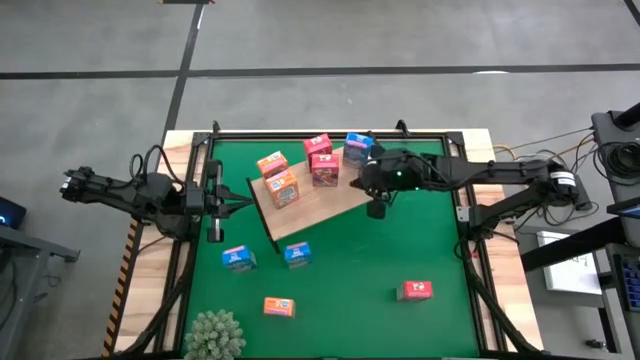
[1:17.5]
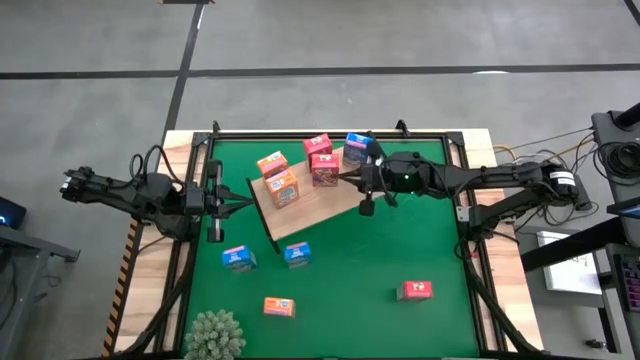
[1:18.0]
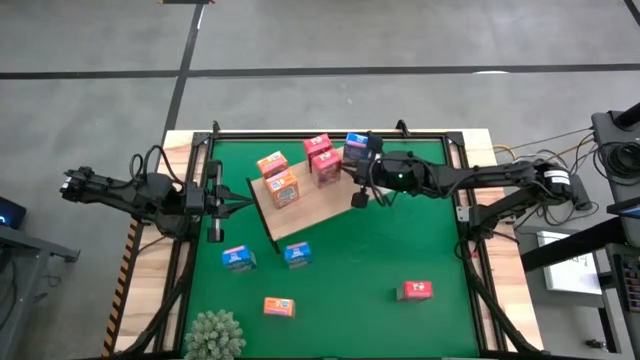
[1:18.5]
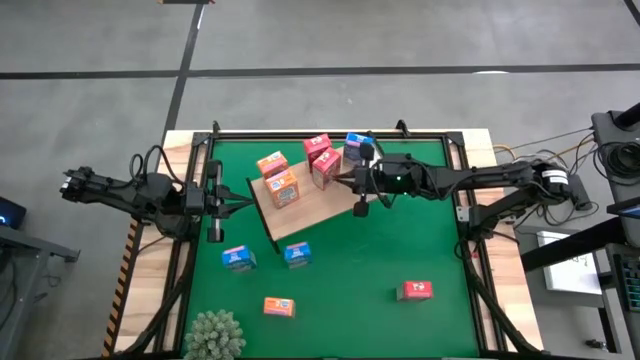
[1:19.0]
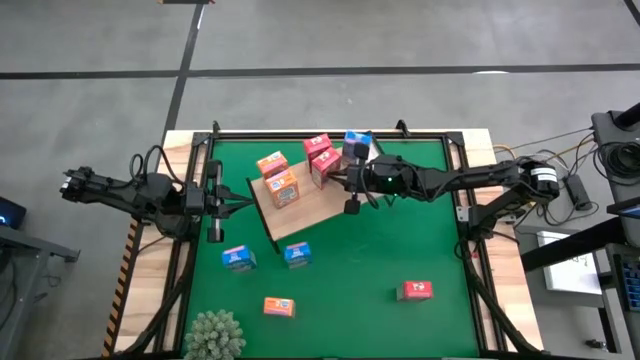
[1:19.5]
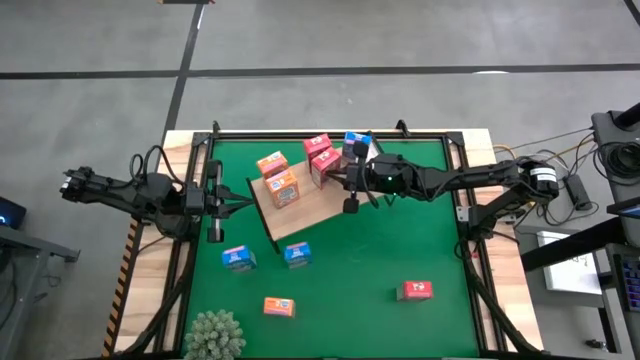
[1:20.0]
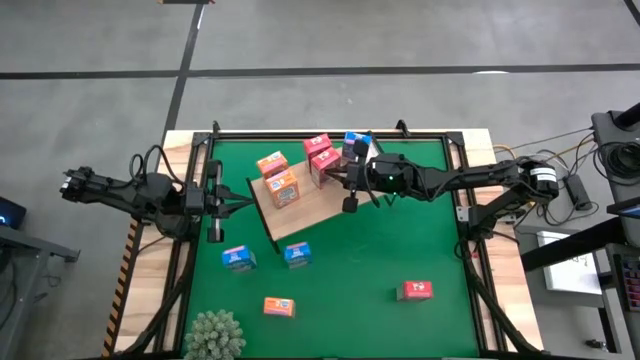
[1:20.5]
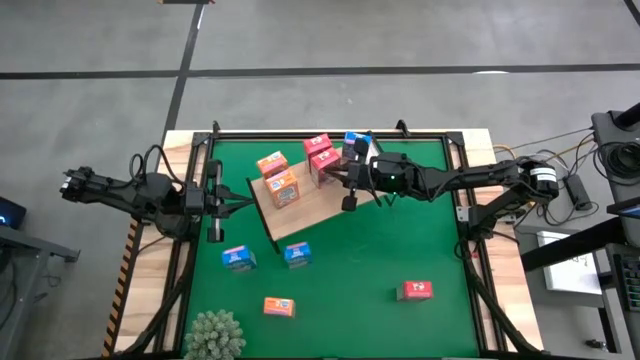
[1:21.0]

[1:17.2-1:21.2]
Task: Stack cereal on shelf
Adjust the bottom red cereal box on the shelf

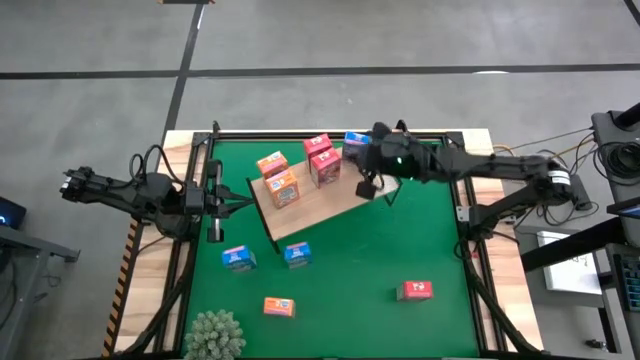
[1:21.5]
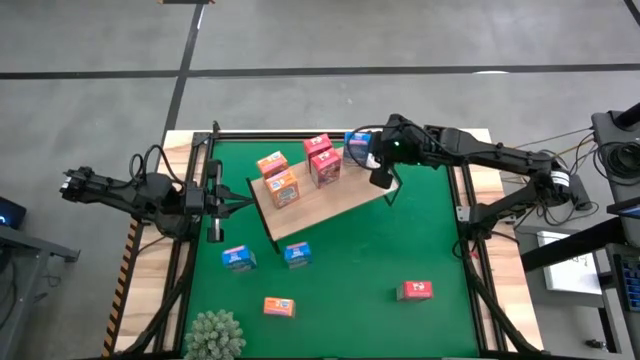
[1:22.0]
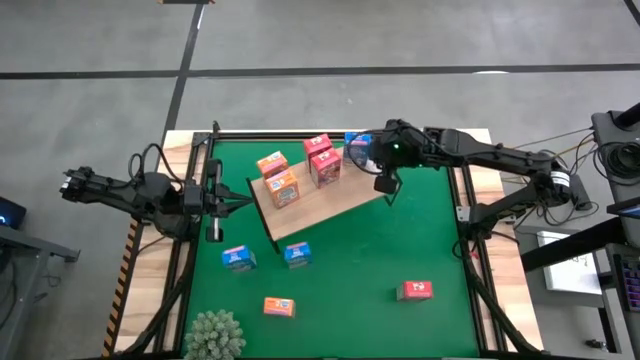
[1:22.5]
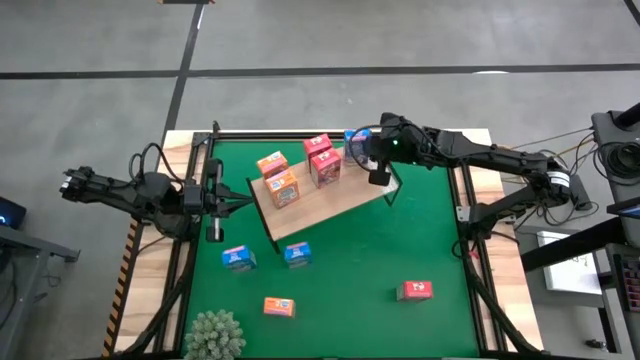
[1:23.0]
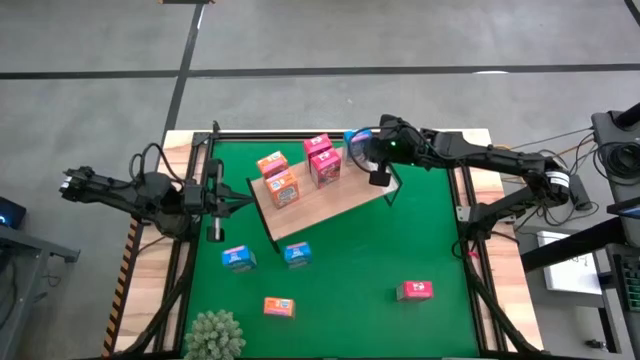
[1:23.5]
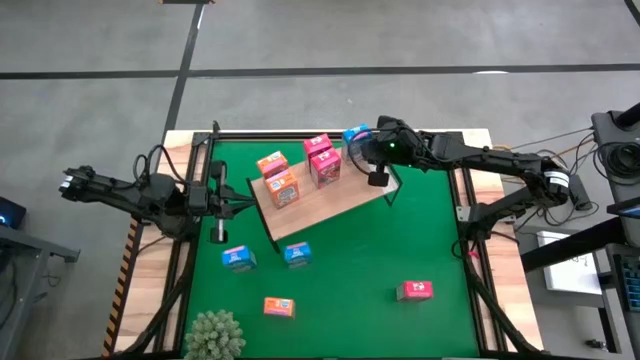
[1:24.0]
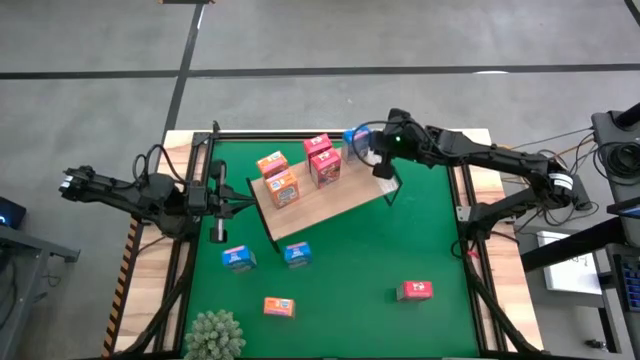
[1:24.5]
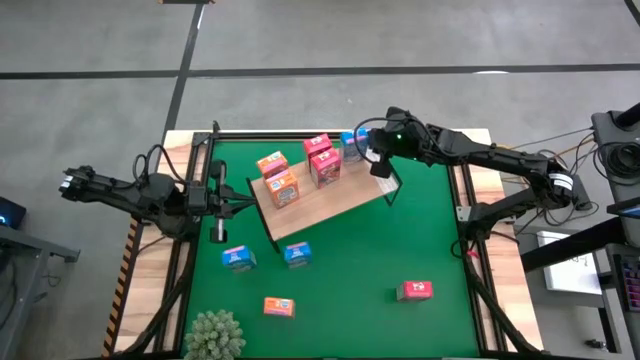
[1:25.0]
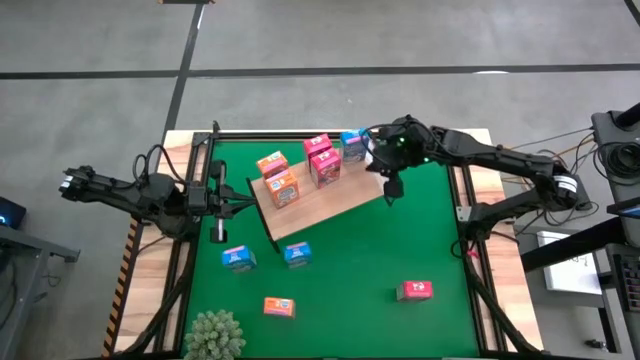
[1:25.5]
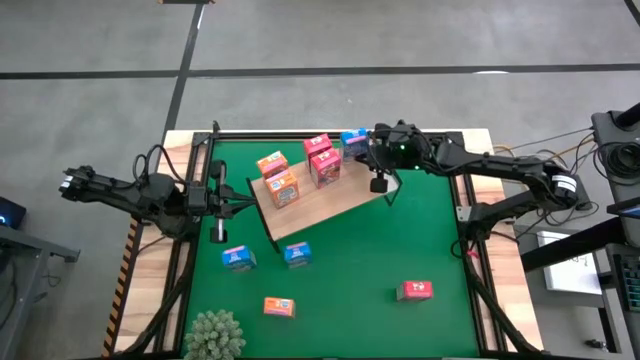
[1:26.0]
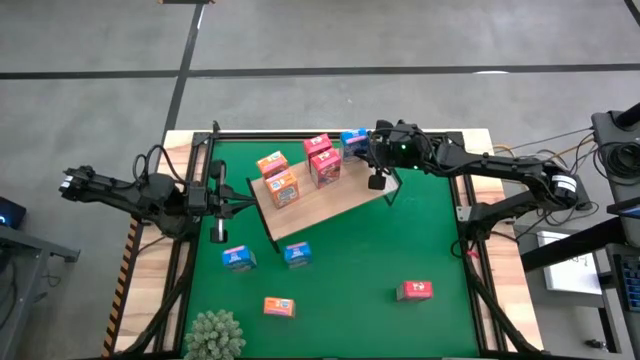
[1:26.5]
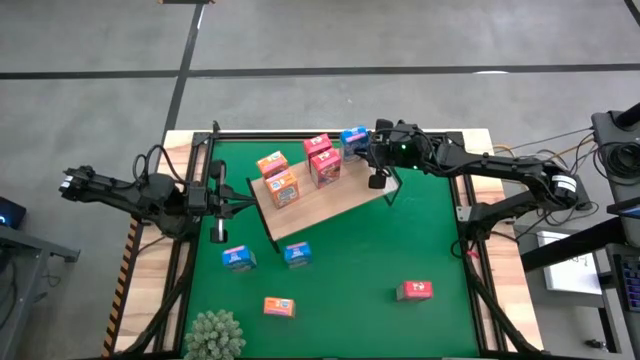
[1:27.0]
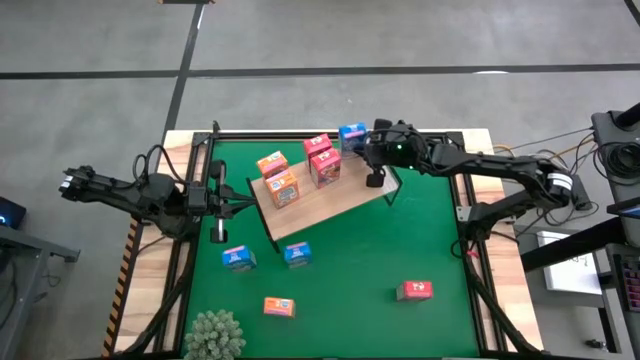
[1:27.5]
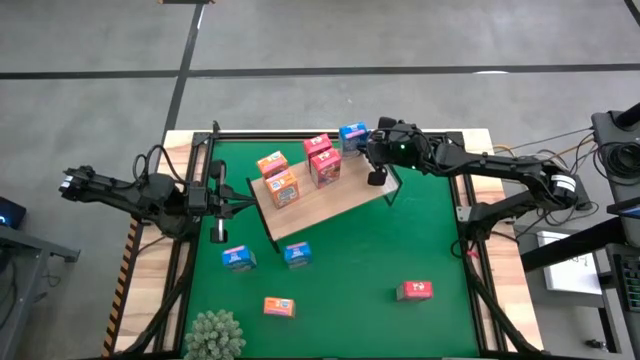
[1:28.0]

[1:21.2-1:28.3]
Adjust the blue cereal box on the shelf

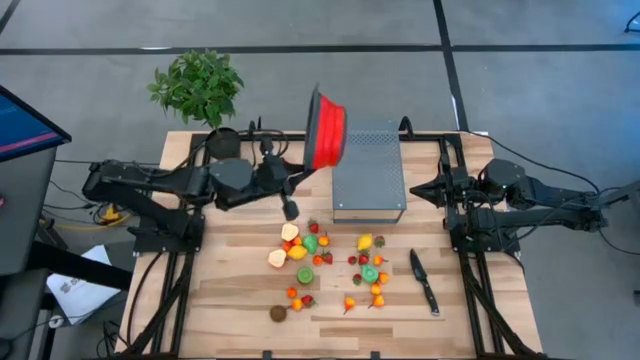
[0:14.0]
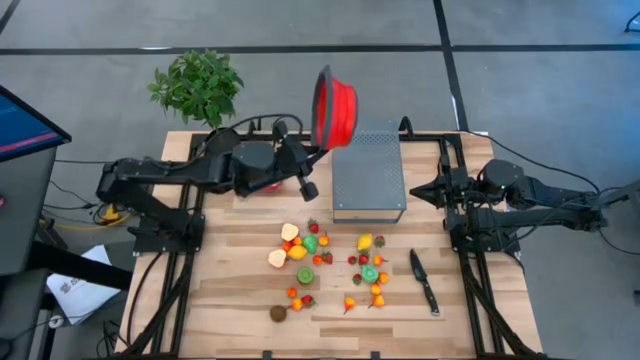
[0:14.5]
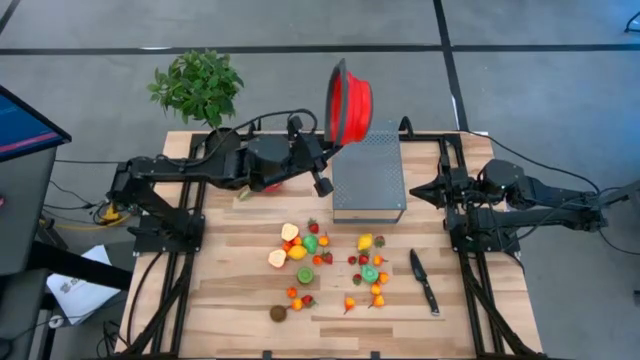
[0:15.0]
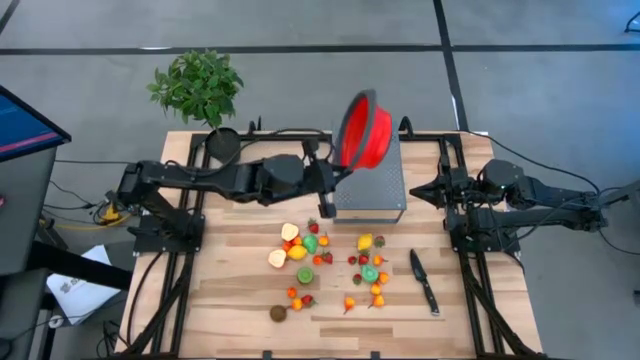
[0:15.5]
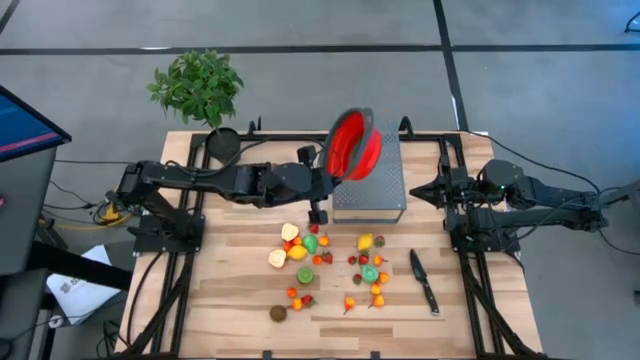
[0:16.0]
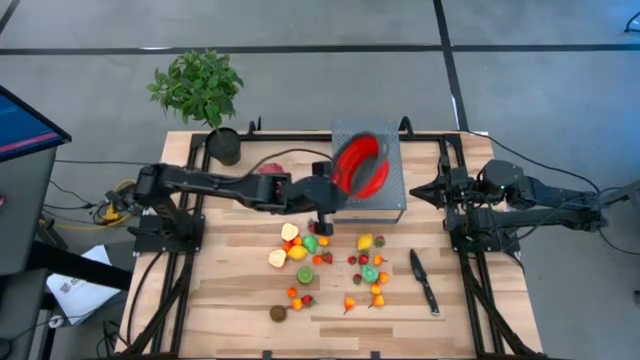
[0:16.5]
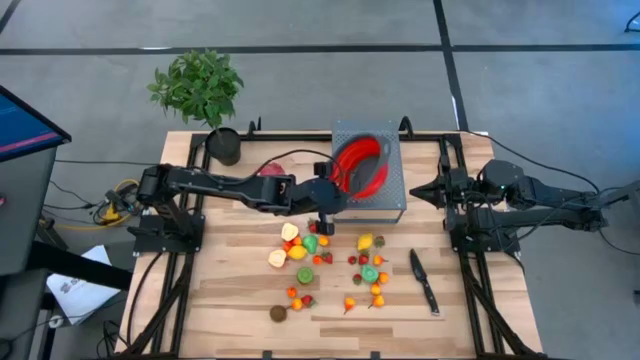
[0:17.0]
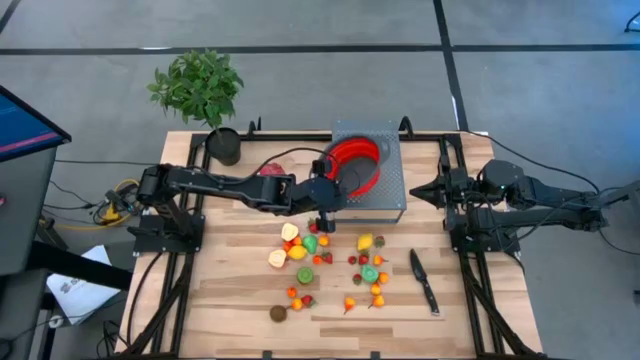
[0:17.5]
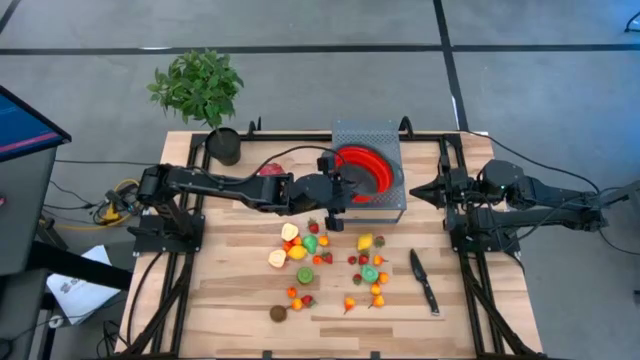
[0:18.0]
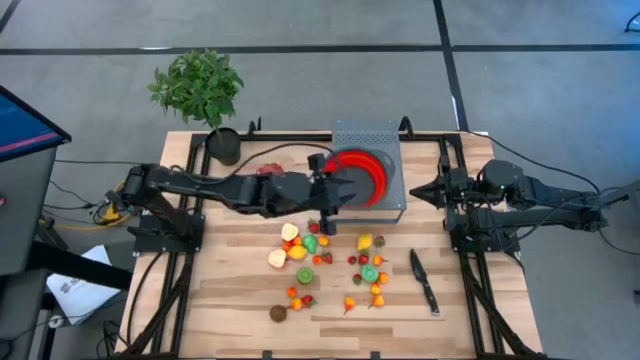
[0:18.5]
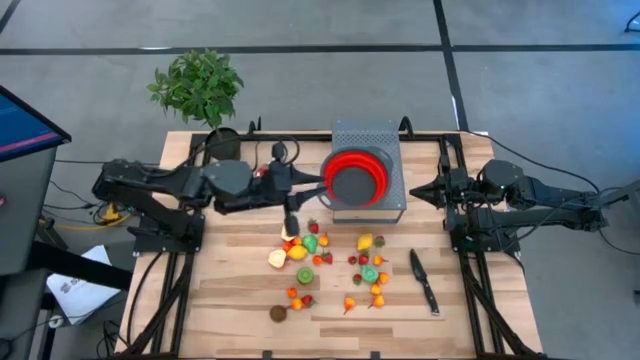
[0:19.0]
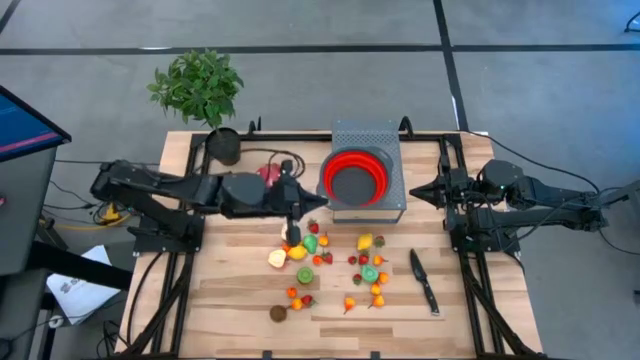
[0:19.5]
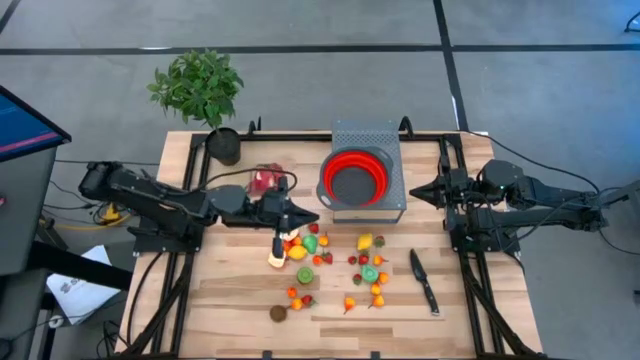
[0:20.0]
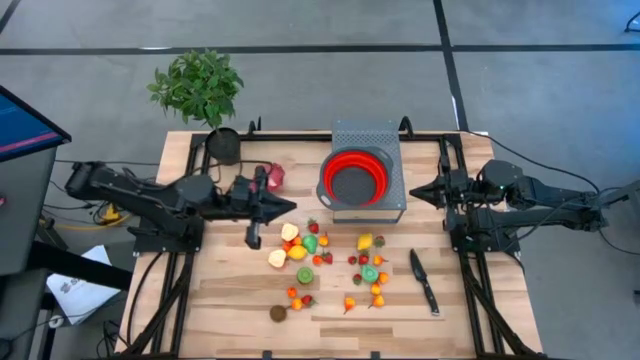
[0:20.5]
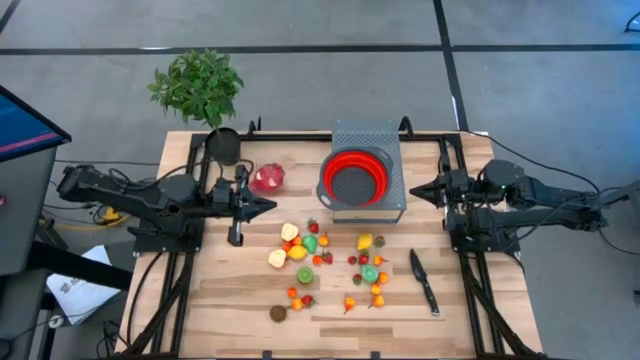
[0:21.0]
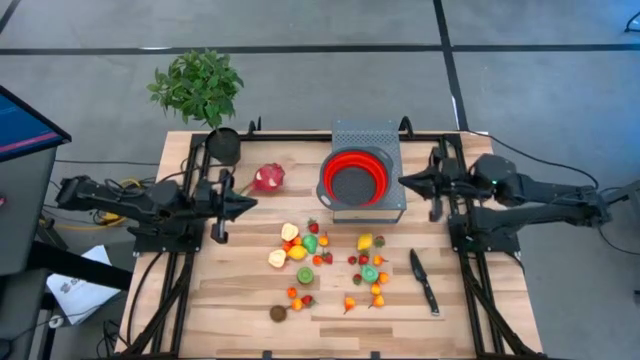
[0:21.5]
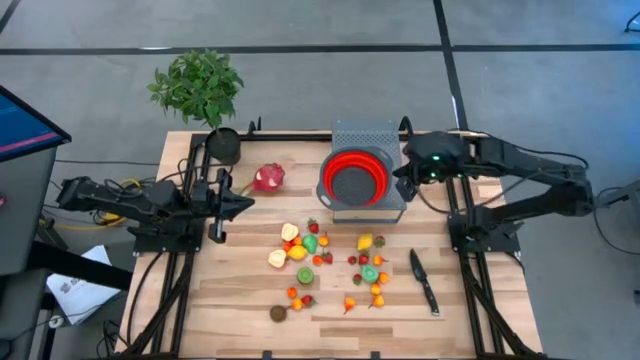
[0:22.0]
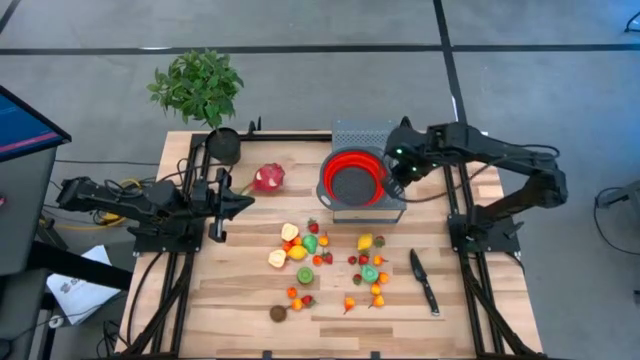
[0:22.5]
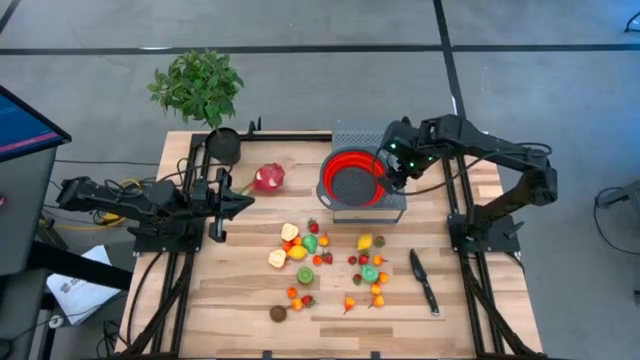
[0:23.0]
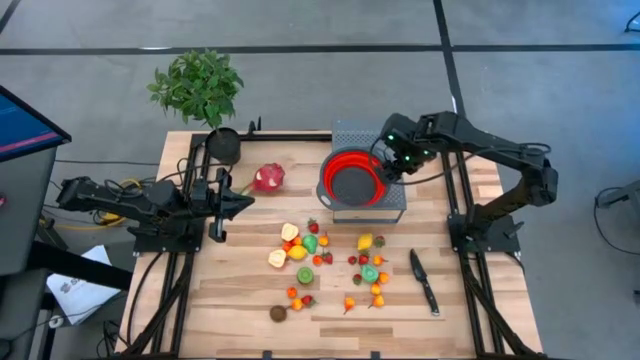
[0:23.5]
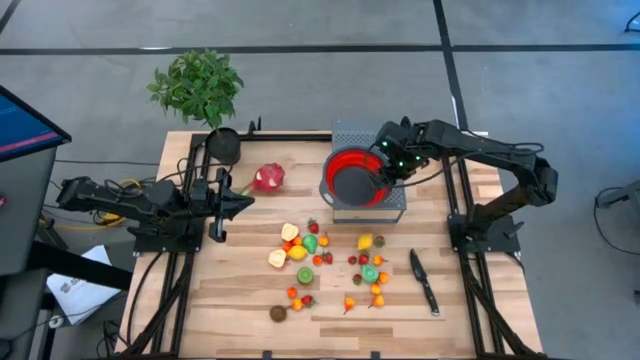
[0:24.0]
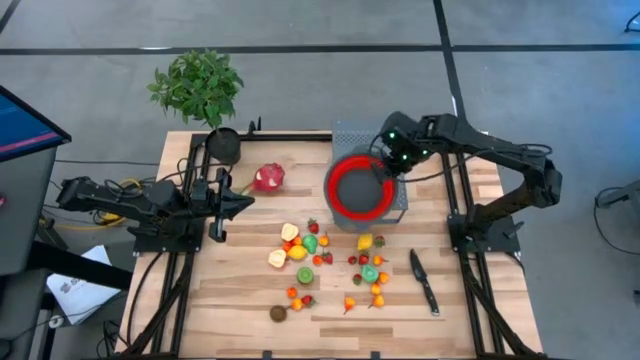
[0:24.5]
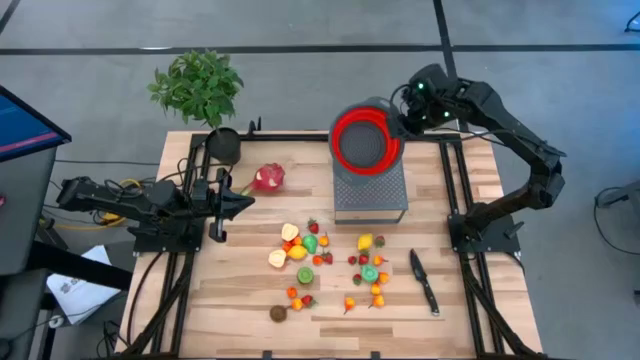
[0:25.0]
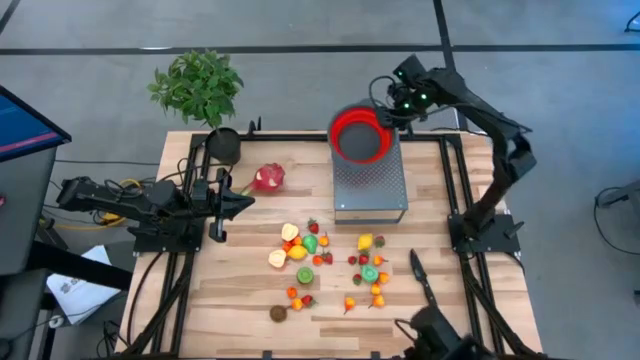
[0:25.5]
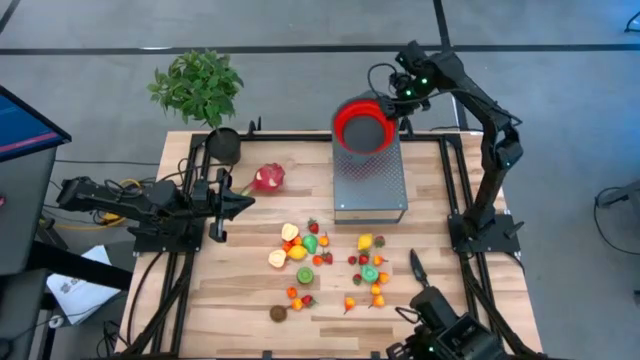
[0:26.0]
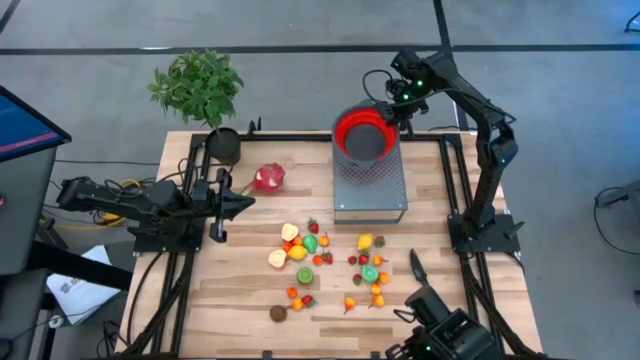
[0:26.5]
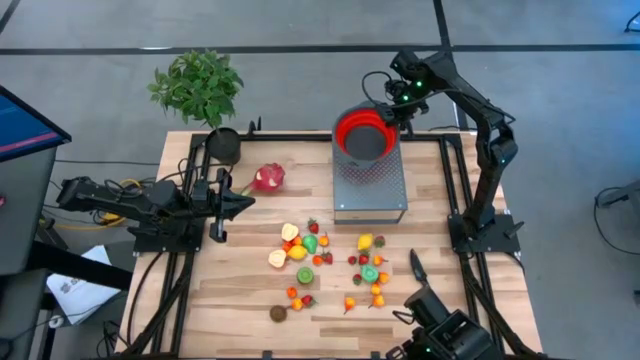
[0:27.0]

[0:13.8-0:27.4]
Task: Pick & Place Fruit
Put the red colander on the shelf
